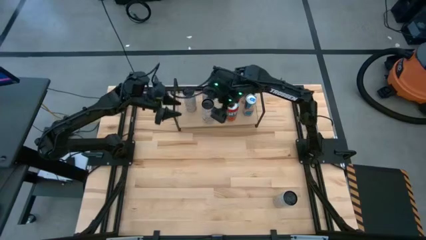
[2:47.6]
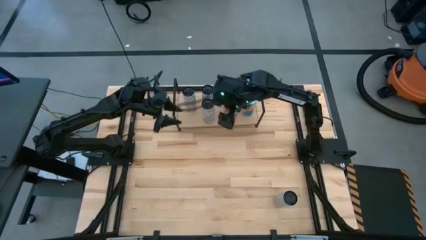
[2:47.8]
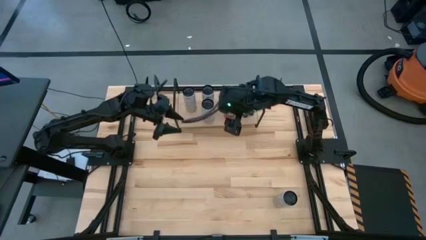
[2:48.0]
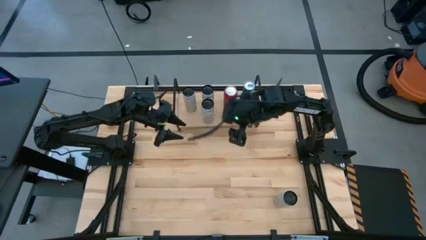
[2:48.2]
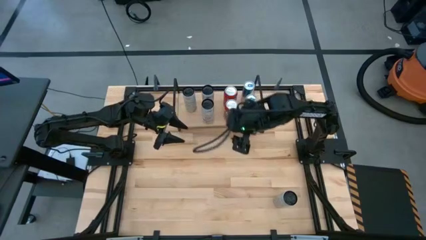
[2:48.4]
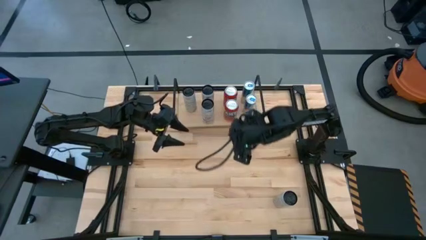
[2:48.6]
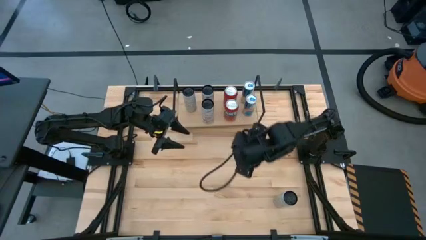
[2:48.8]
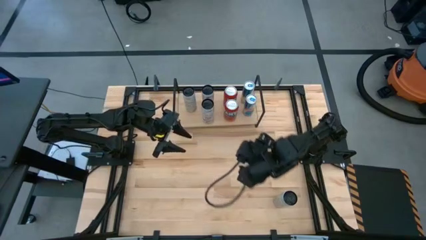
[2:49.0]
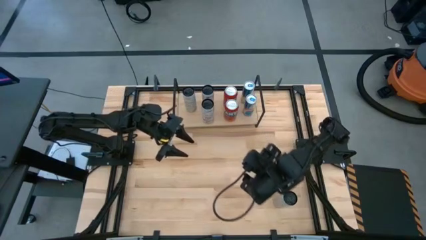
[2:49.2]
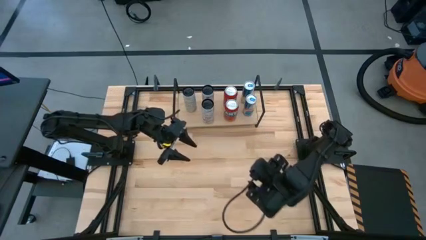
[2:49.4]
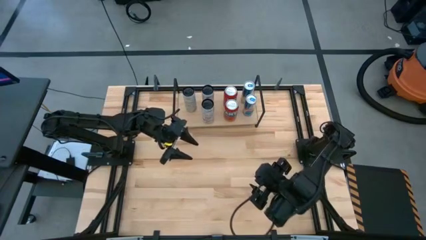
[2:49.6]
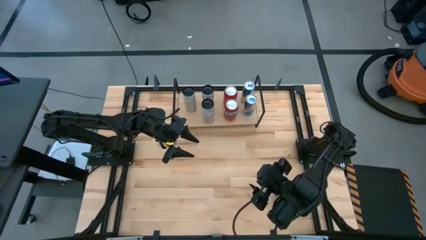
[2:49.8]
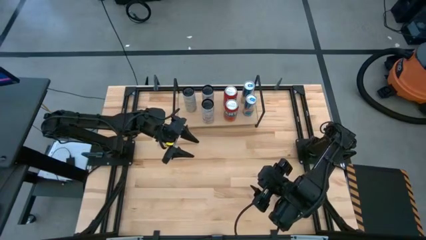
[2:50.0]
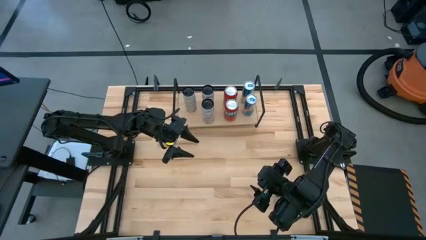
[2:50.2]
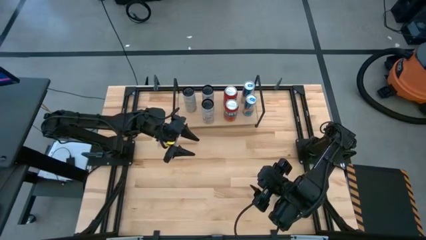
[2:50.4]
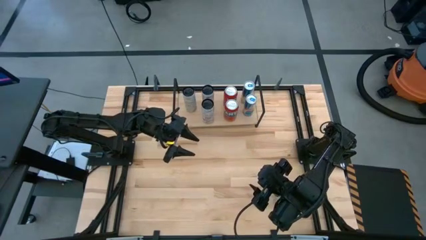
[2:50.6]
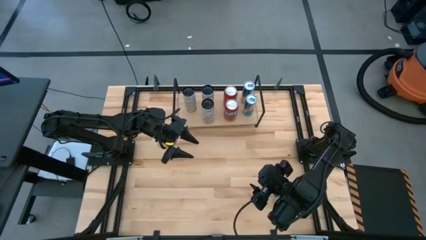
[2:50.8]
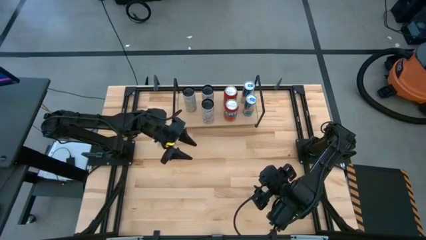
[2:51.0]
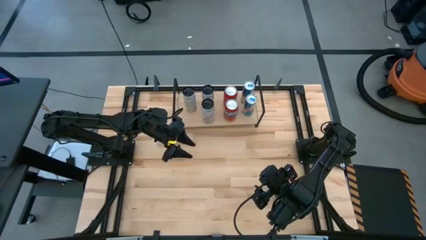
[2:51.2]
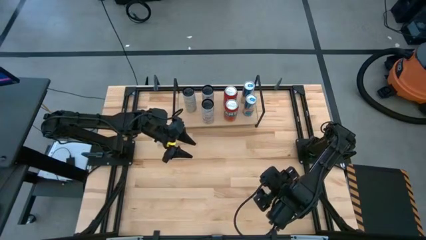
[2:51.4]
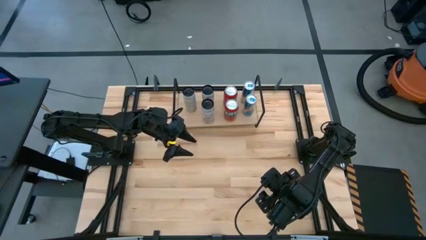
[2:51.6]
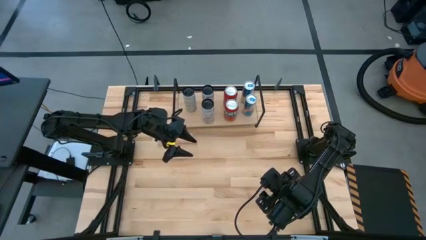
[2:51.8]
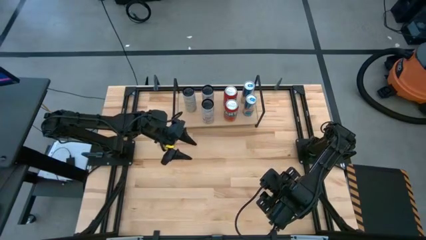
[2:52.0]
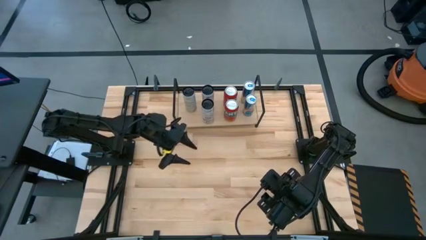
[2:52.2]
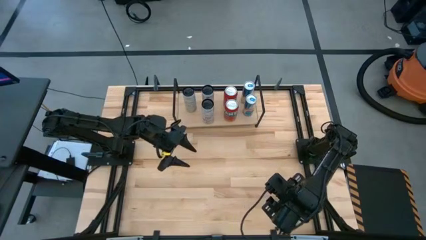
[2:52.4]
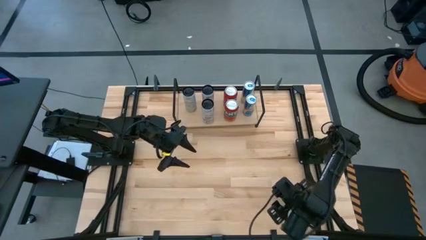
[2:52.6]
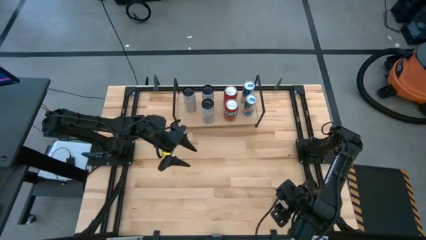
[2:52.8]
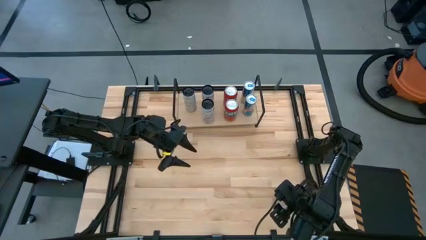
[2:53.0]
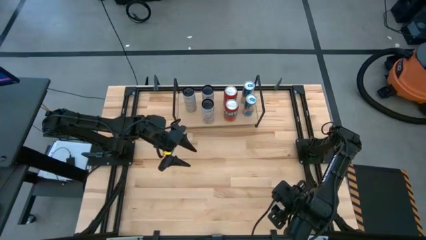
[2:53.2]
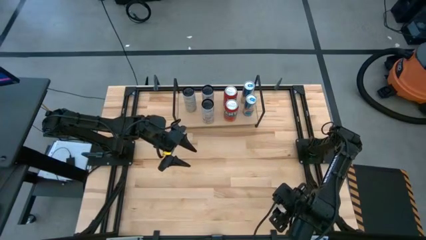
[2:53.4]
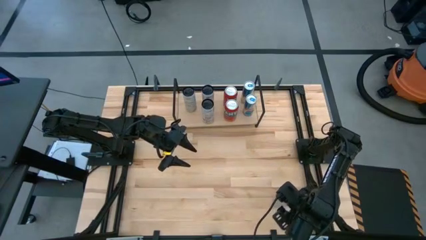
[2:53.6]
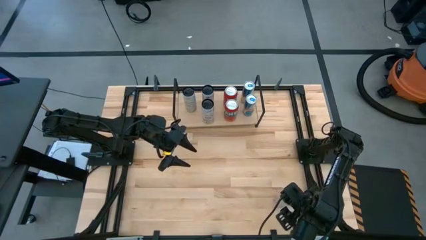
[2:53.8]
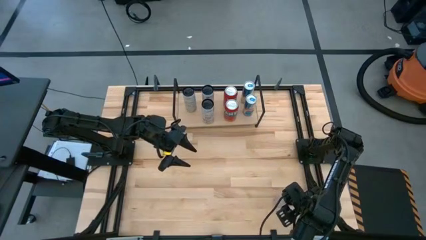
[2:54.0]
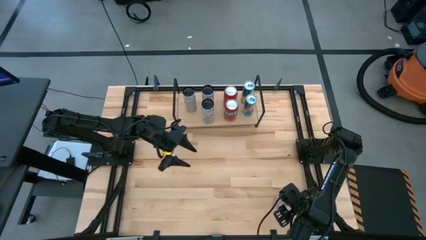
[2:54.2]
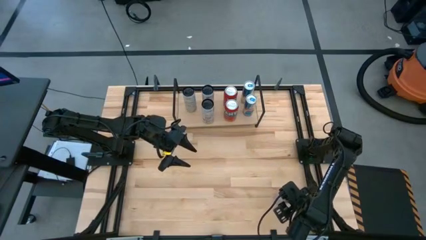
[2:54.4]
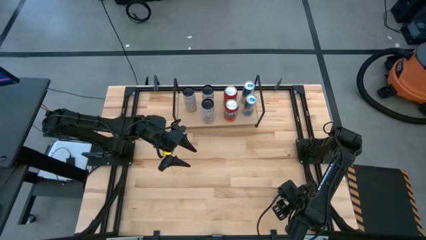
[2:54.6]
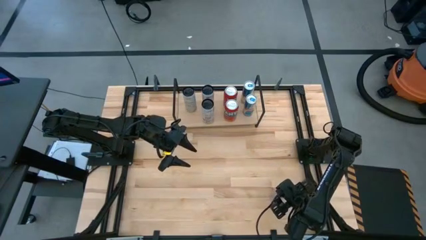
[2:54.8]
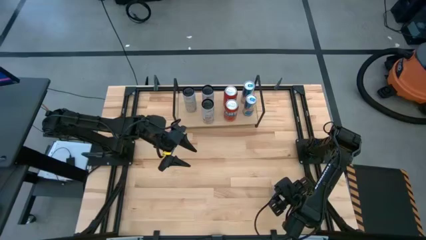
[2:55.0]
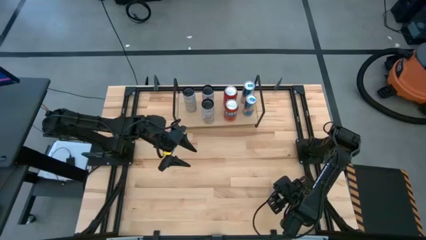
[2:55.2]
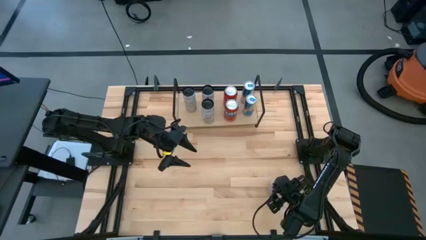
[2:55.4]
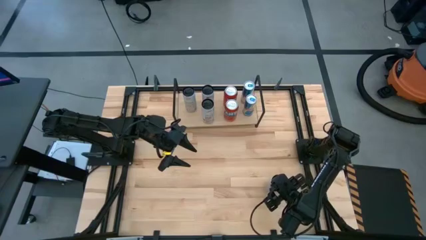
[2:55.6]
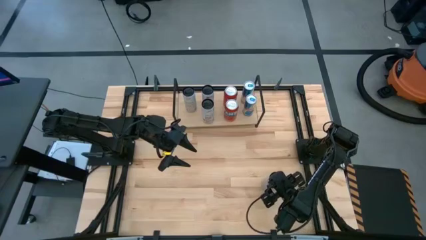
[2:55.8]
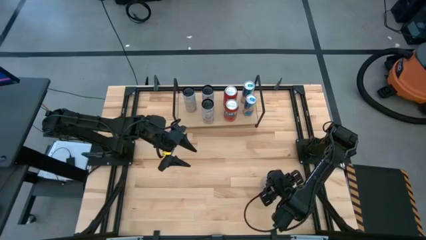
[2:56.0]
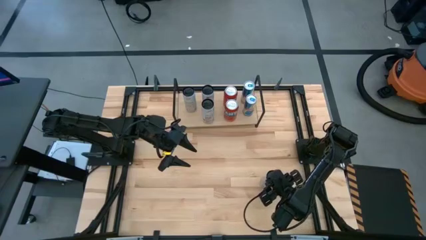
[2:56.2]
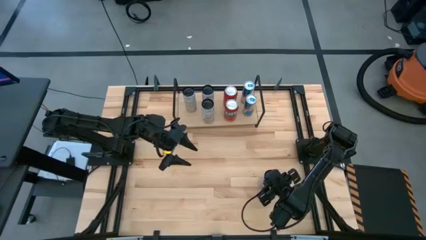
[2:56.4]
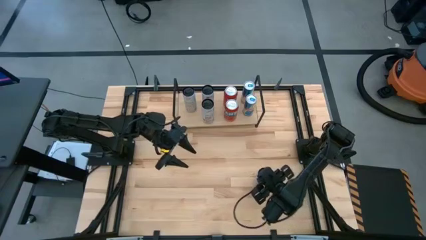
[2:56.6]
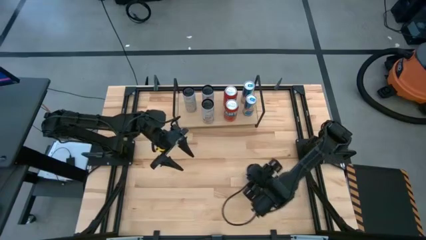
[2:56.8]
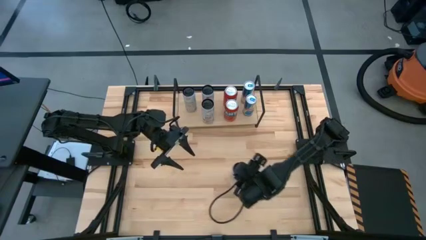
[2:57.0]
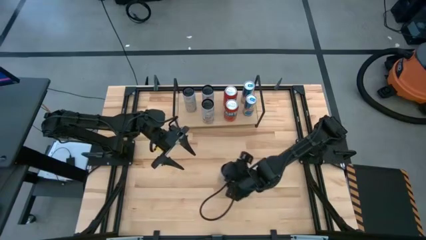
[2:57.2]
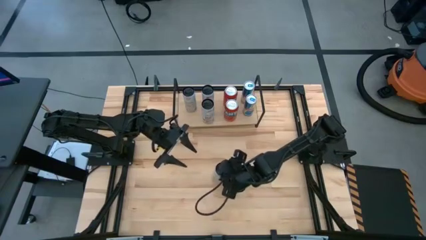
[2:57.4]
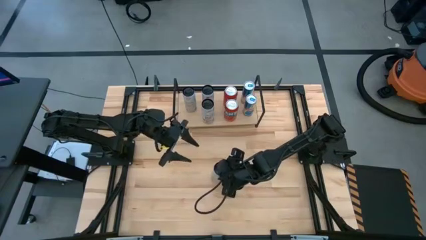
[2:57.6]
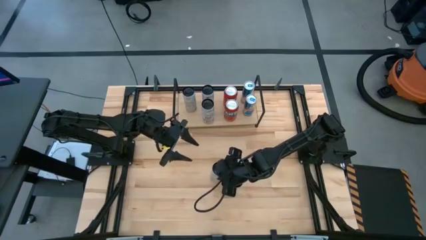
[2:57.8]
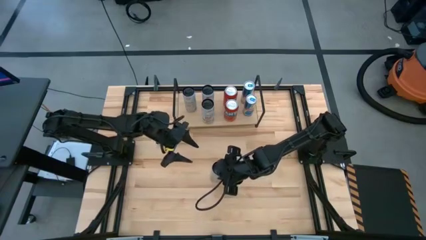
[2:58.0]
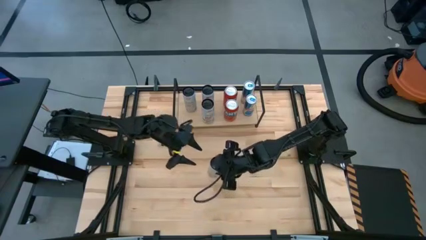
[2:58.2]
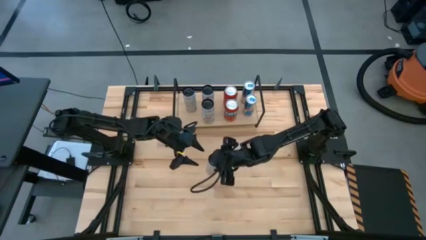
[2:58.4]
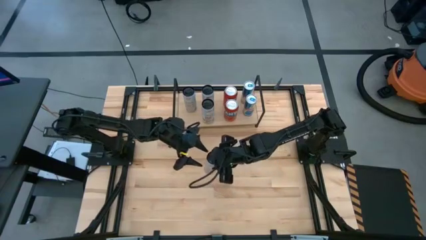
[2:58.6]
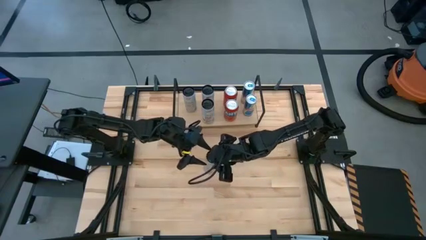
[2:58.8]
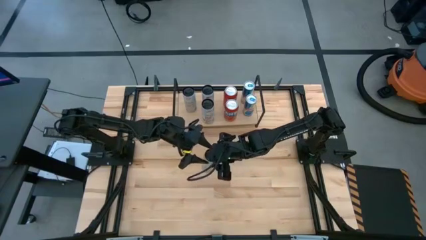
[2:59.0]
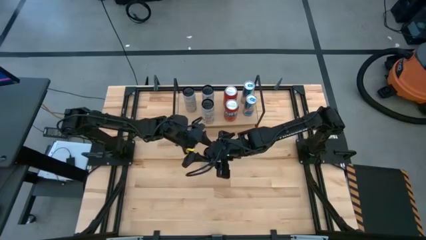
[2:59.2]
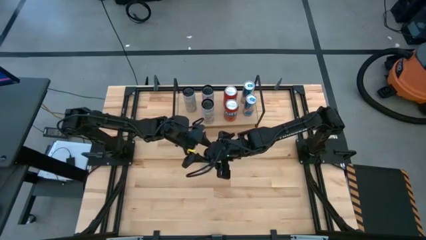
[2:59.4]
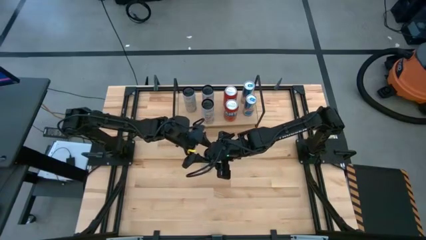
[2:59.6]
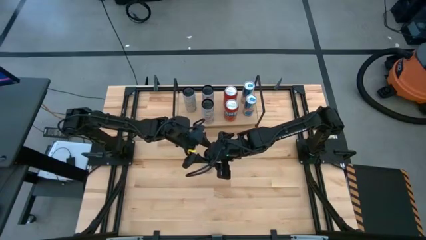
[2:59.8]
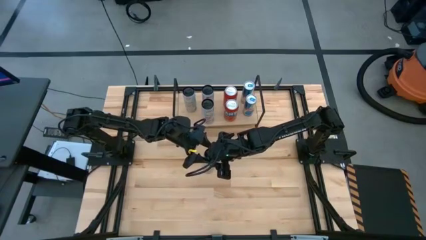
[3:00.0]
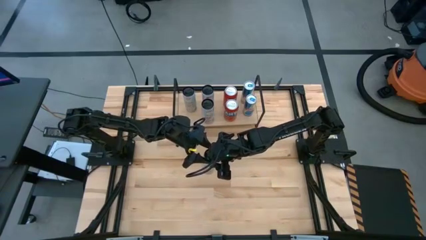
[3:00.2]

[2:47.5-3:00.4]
Task: Place canned beverage on shelf
Put the white and pink soda can aligned with the other white and pink soda can on the shelf

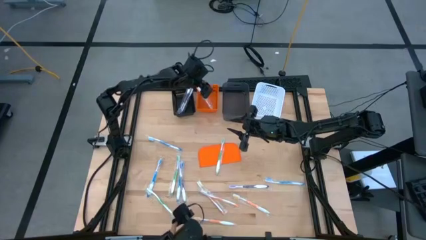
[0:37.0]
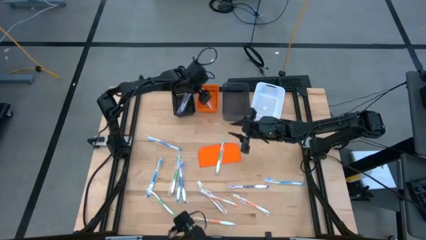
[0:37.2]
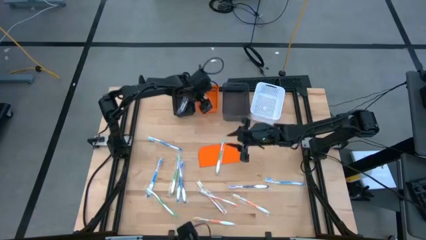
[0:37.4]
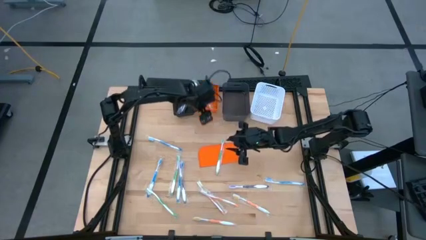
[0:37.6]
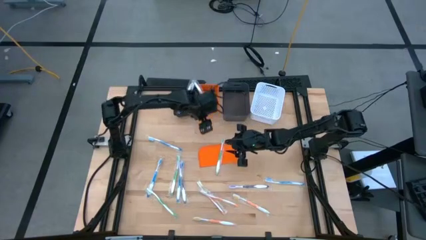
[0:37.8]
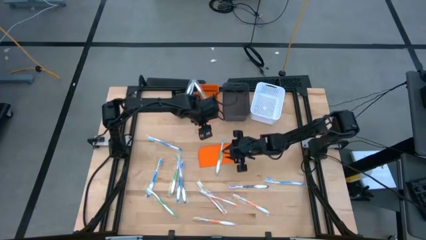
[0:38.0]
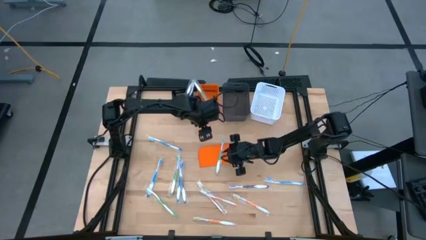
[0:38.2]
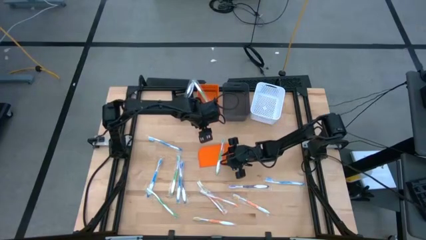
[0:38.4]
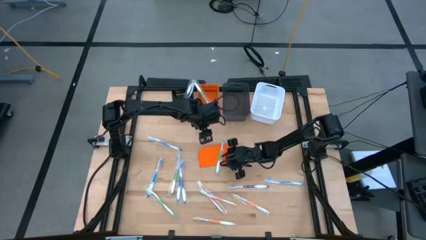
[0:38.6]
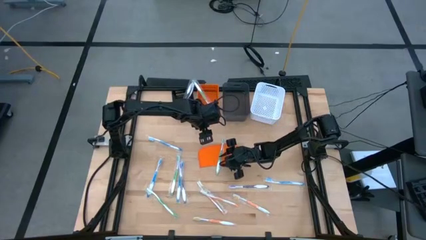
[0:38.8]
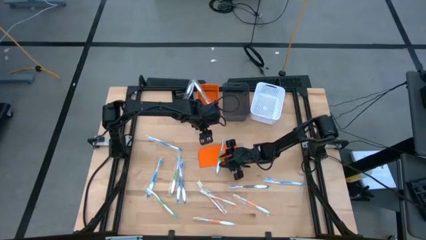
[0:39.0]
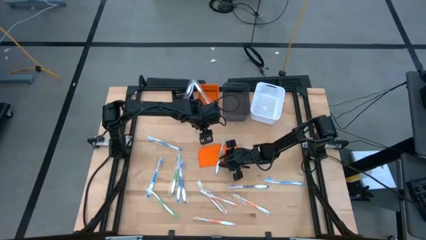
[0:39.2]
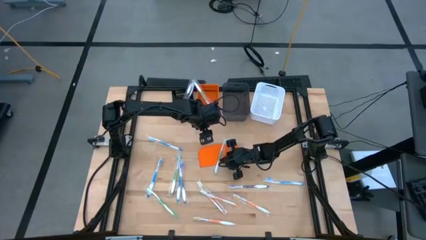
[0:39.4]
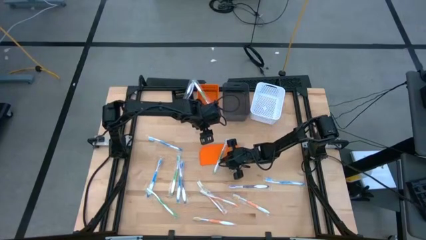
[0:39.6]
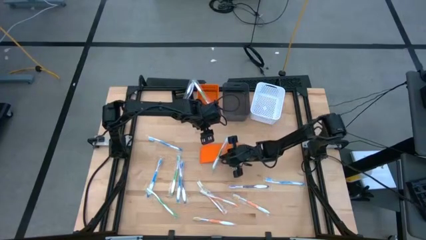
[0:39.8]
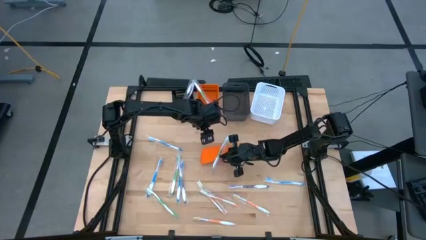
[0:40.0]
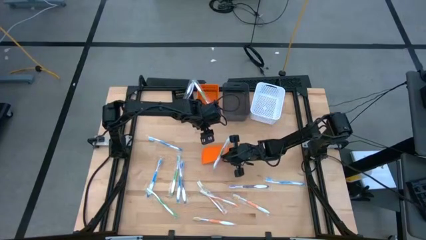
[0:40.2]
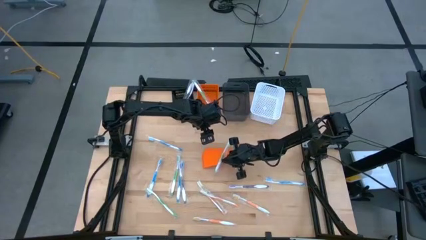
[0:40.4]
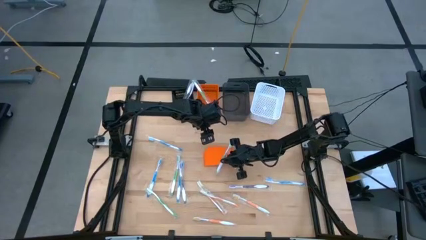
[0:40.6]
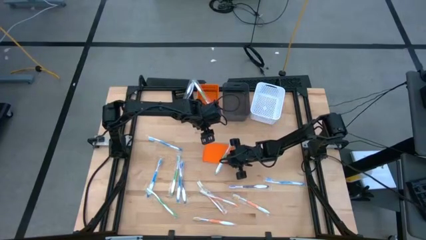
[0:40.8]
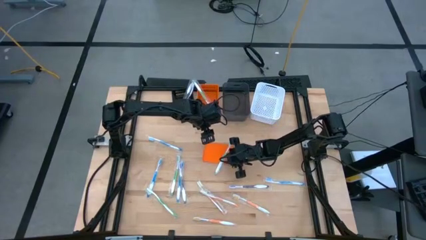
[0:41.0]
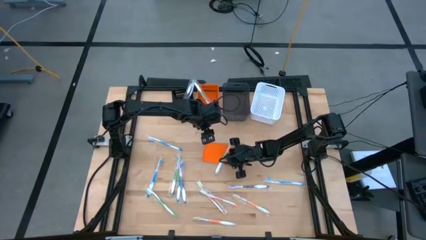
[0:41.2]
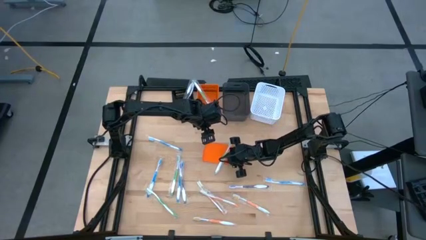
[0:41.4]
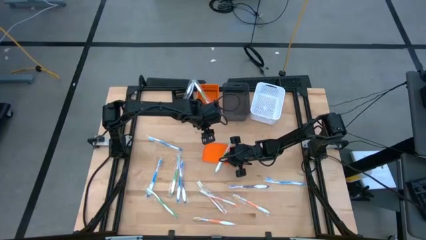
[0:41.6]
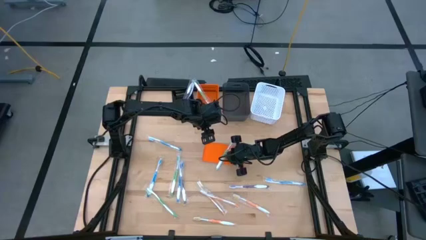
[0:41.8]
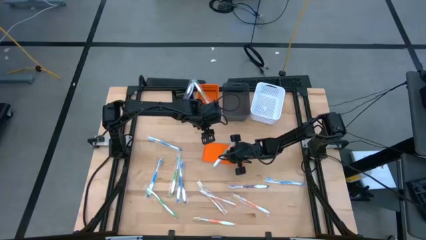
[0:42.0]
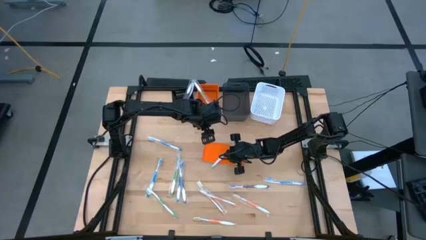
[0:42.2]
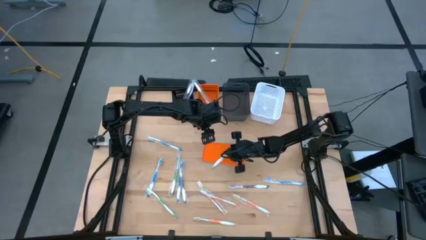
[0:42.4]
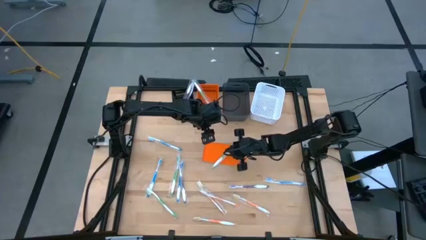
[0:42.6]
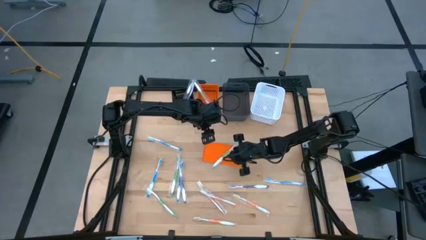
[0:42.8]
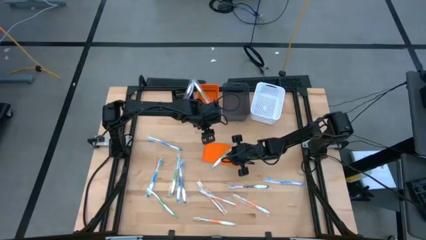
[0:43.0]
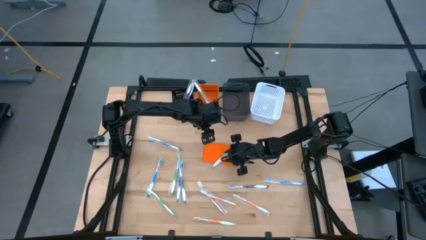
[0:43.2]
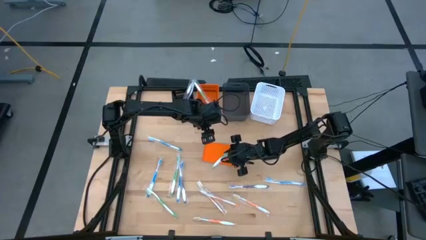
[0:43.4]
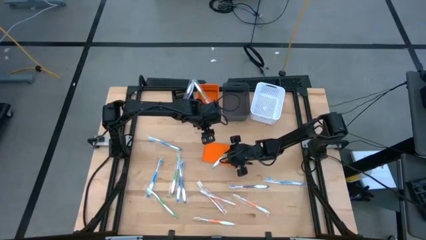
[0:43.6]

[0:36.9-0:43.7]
Task: Pick & Place Toothbrushes
Put the green toothbrush into the orange bin
